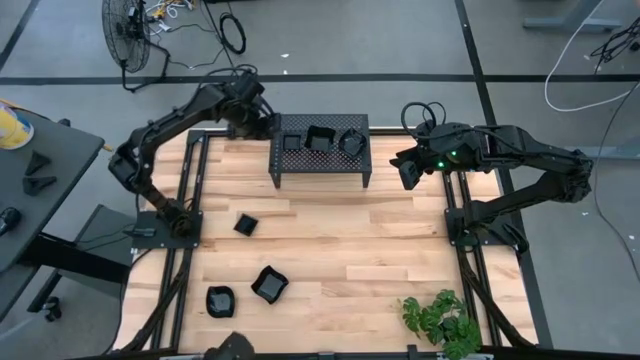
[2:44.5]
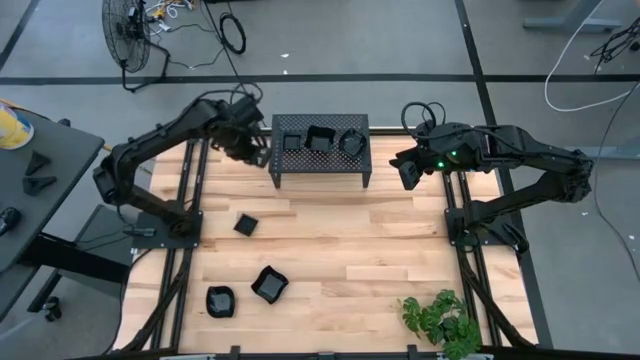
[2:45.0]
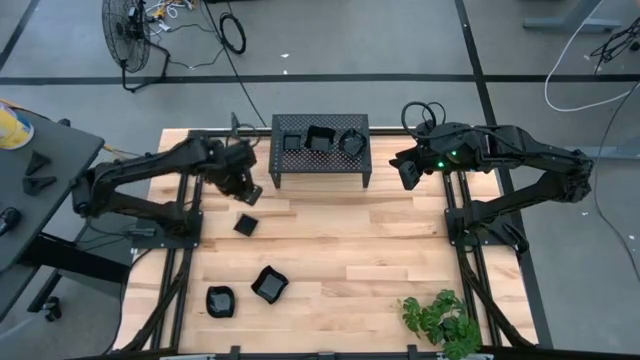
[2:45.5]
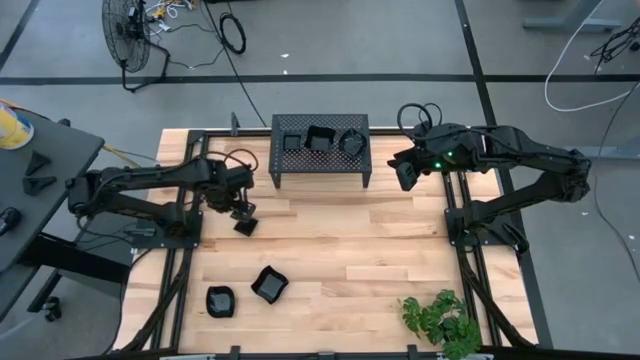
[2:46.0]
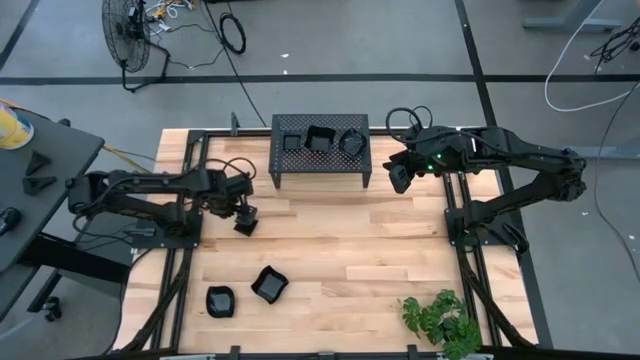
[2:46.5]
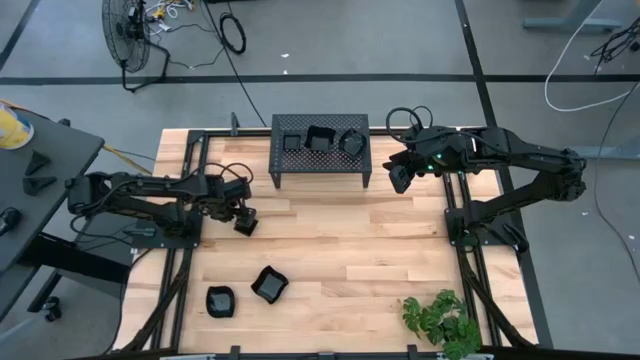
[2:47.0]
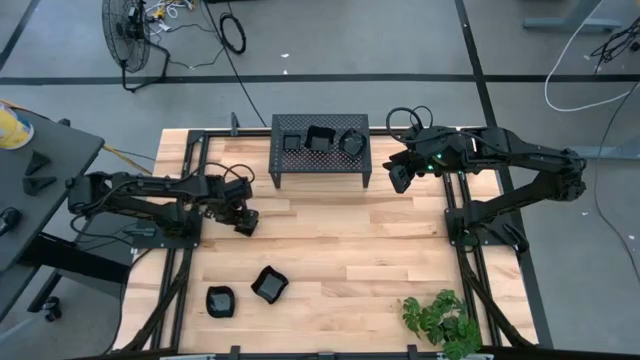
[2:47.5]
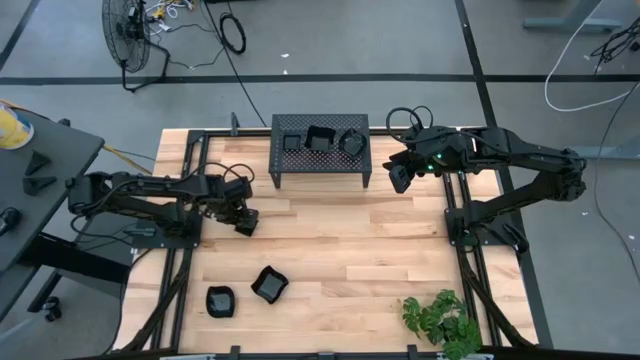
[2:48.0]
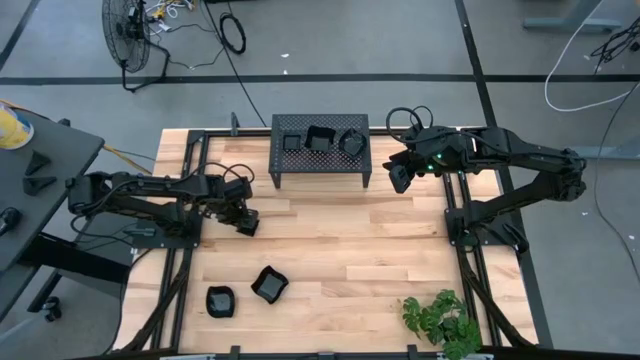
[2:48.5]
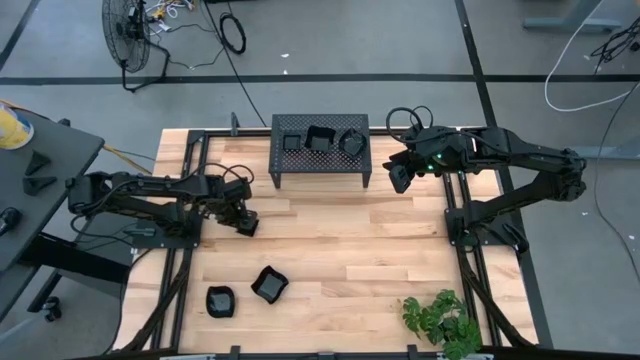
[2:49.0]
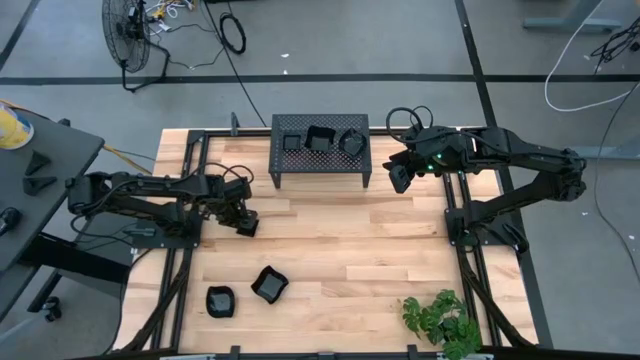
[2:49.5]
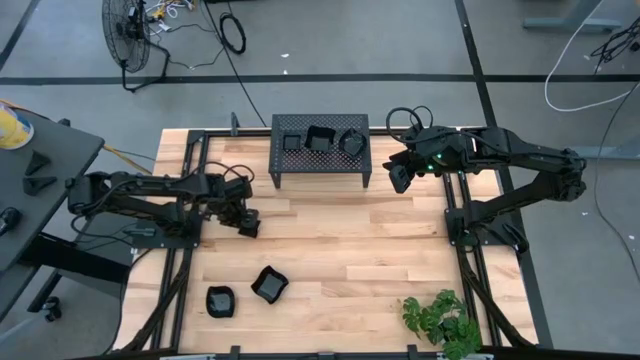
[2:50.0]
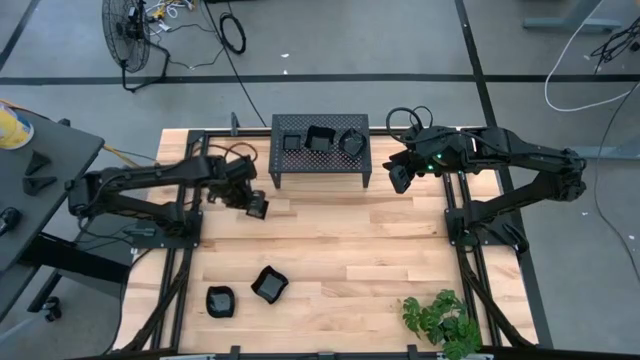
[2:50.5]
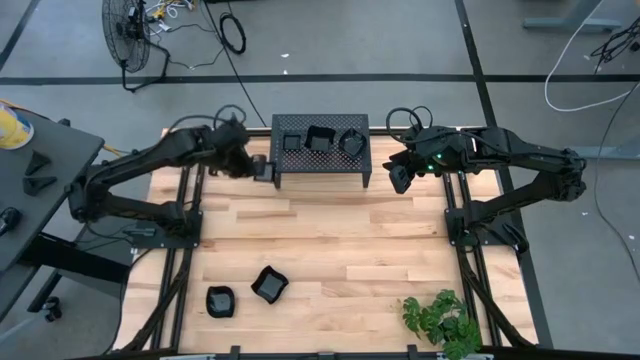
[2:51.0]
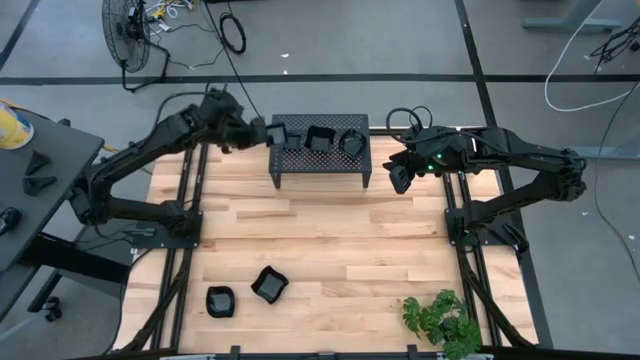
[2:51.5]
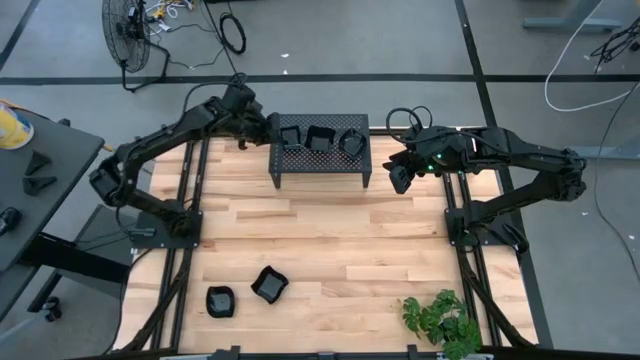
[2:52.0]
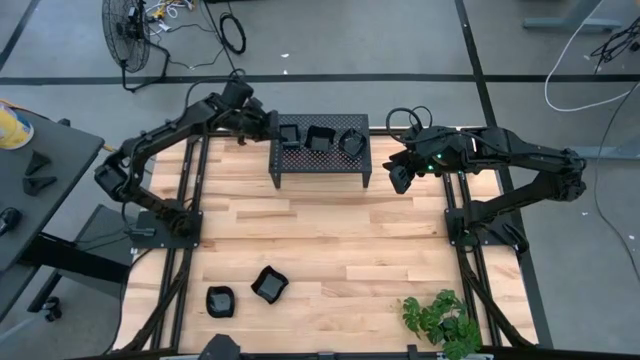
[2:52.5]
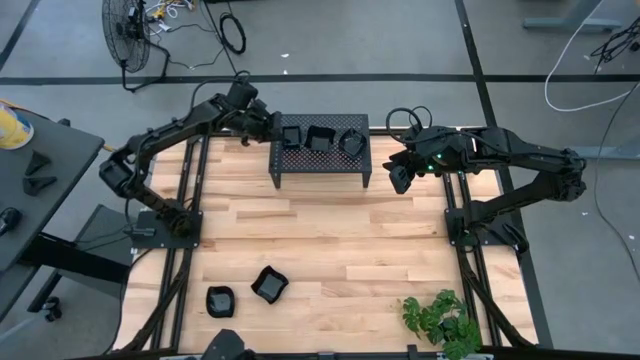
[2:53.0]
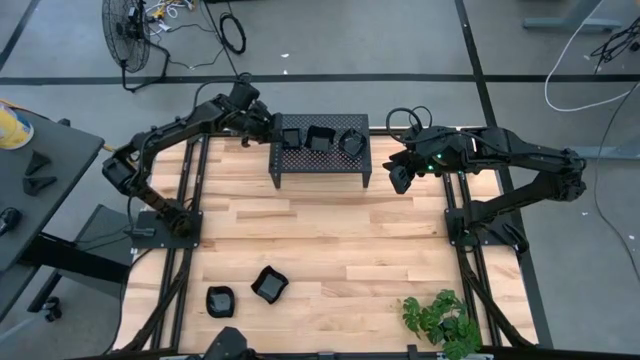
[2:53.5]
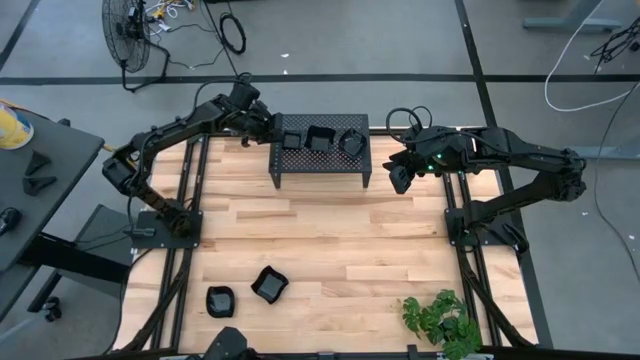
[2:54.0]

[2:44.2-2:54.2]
Task: Pick & Place Mini shaped plates
Stack the square plate on top of the other square plate on the shelf

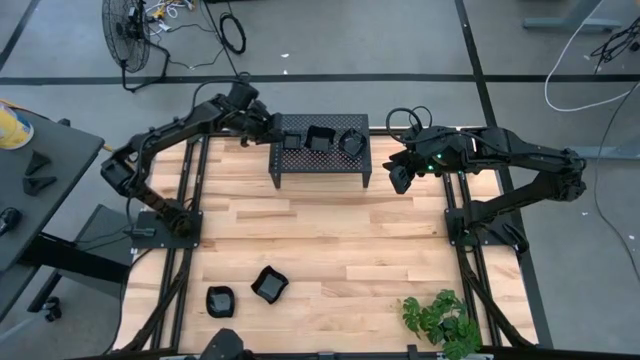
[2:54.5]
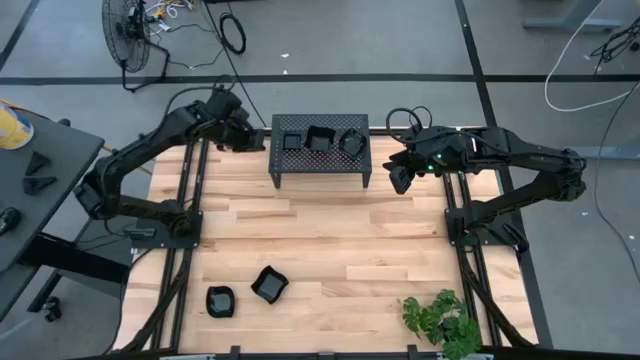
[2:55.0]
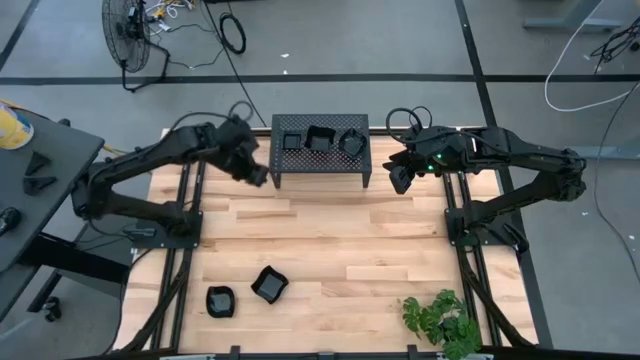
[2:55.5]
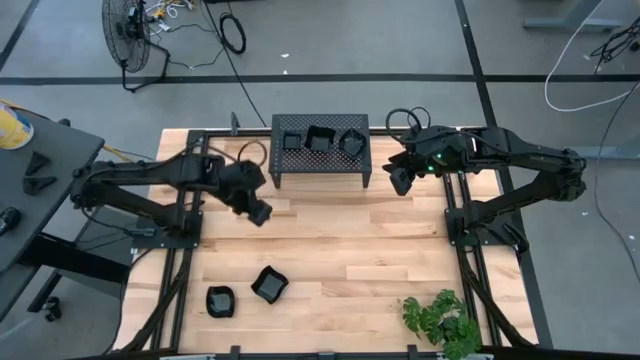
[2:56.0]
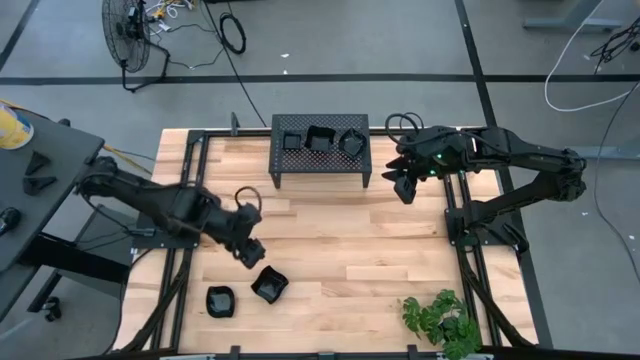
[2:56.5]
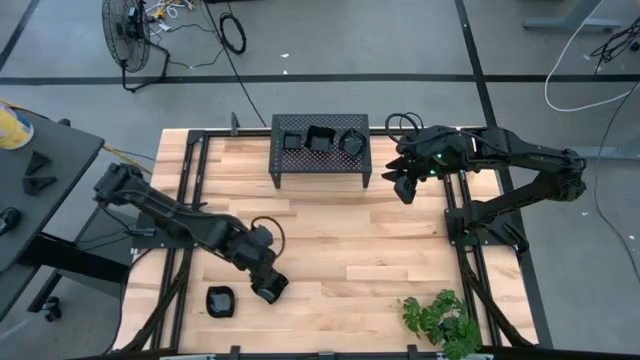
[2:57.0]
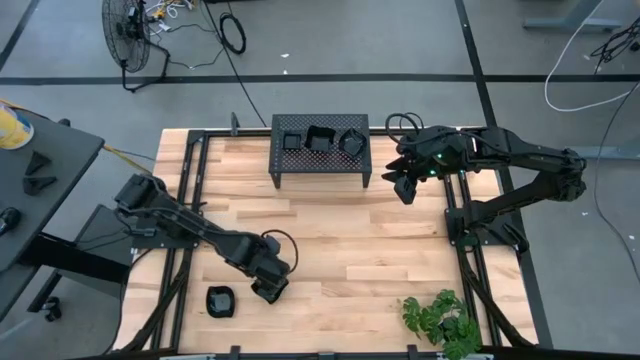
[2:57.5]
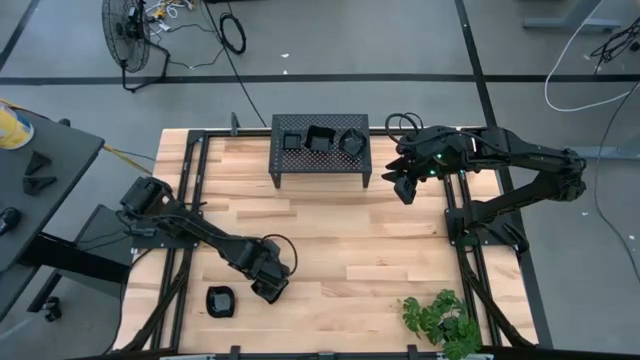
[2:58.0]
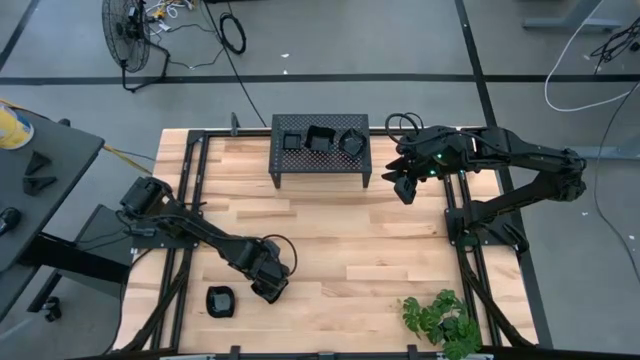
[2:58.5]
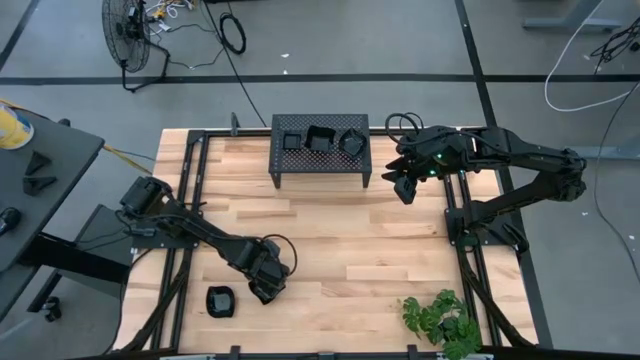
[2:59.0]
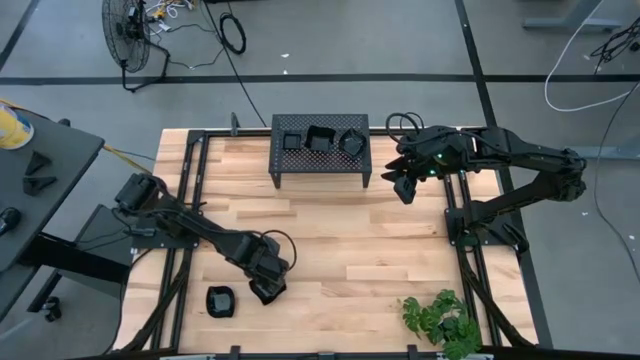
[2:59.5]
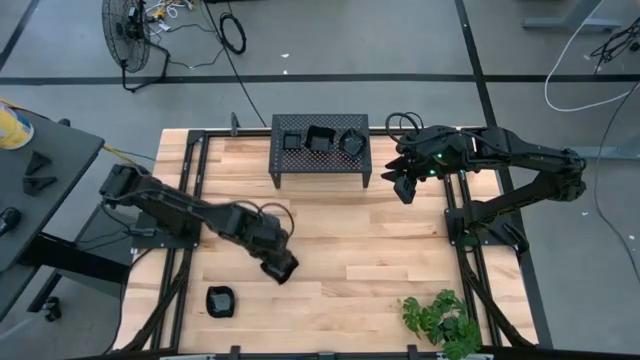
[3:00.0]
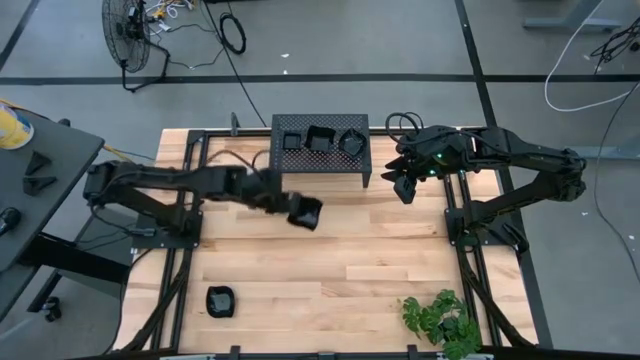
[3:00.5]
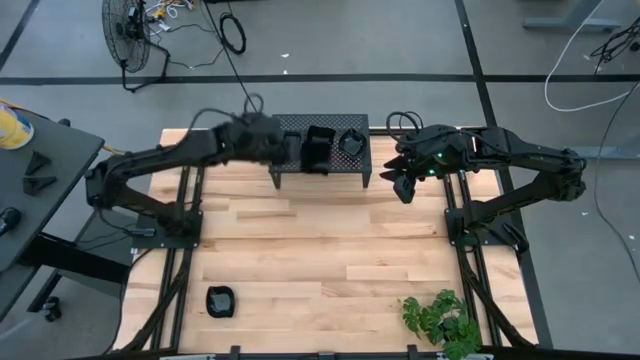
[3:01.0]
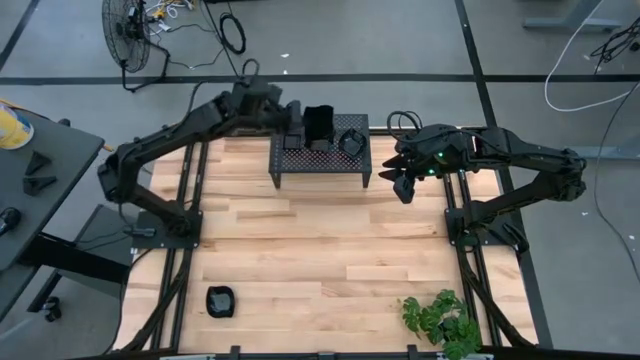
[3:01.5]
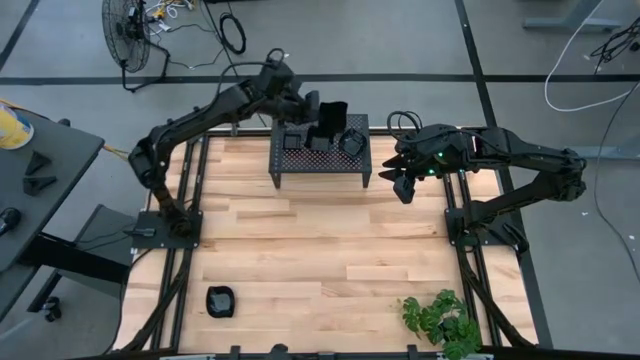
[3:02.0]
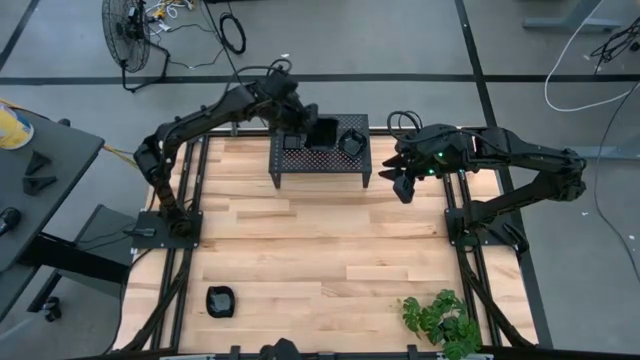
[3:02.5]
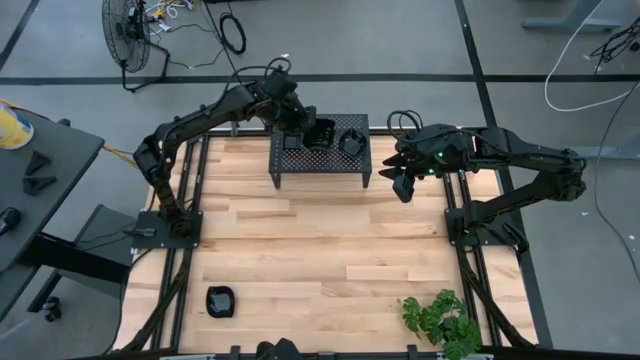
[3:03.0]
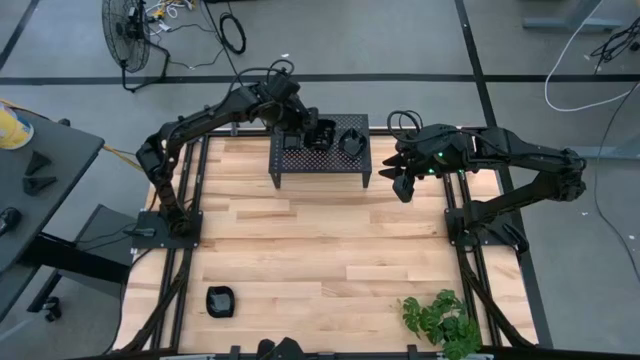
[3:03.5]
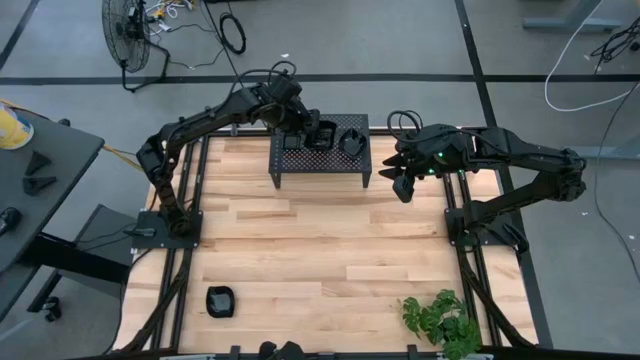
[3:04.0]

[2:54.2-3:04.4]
Stack the distorted square plate on top of the other distorted square plate on the shelf

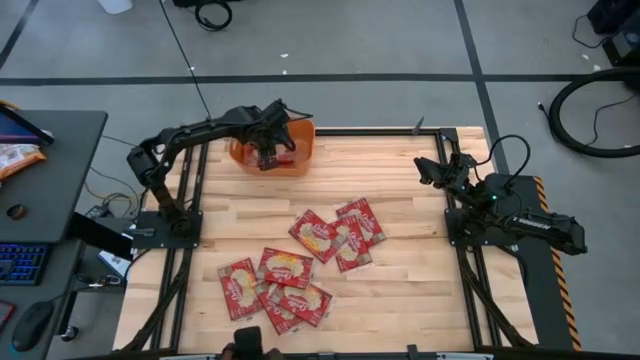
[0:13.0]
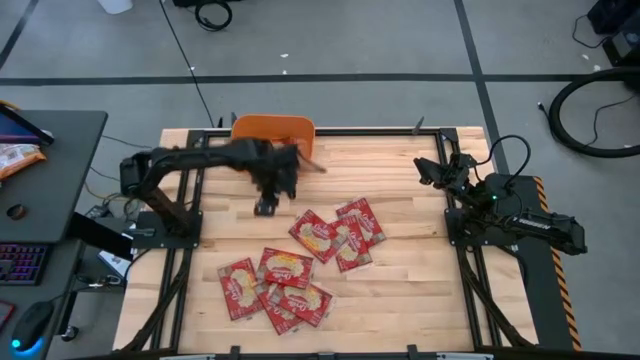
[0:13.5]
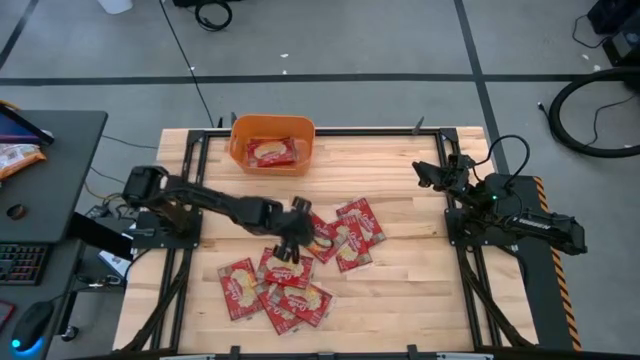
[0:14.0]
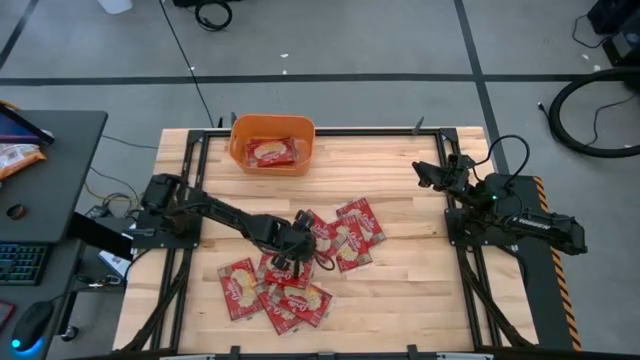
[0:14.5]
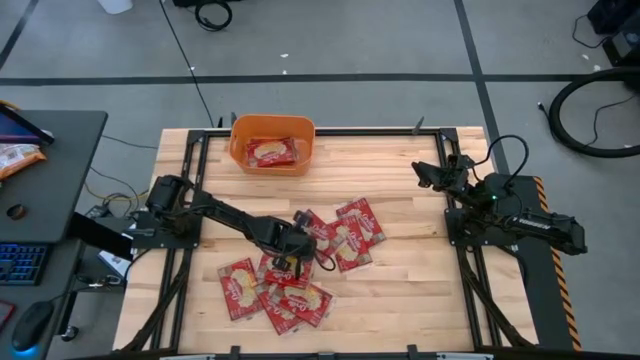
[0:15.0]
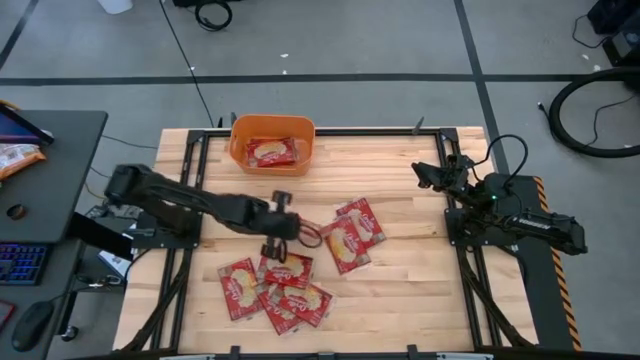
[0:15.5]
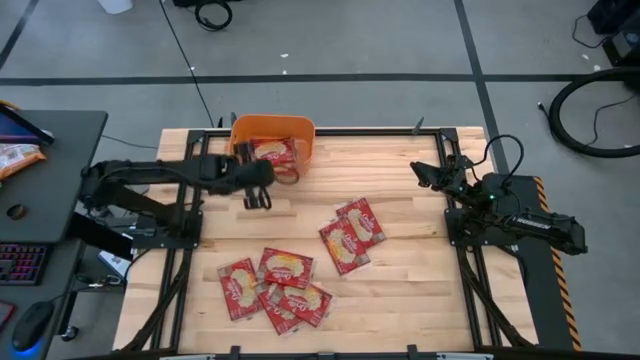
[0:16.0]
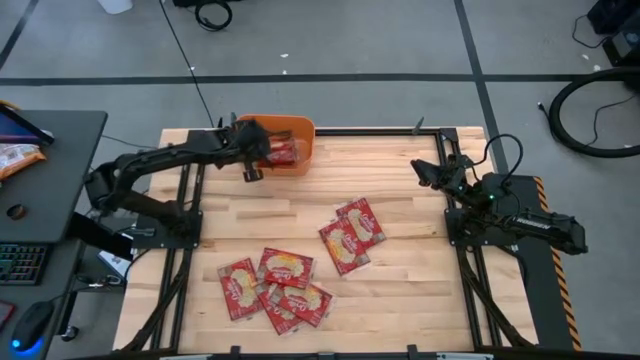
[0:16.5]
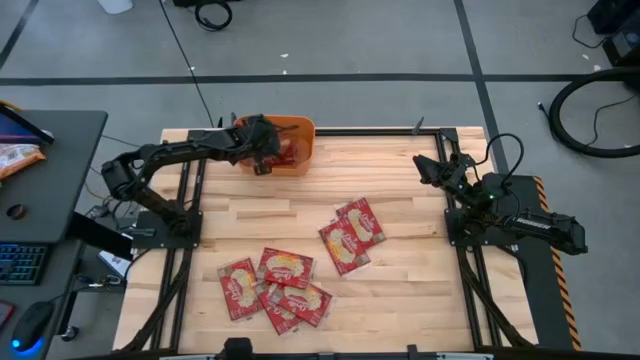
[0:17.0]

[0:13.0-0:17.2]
Task: Sort popcorn bags into baskets
Put the popcorn bag into the orange bin
